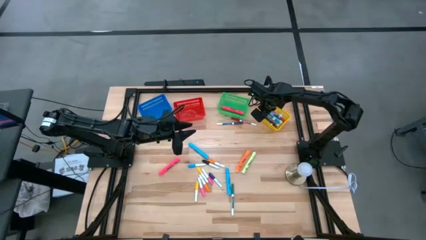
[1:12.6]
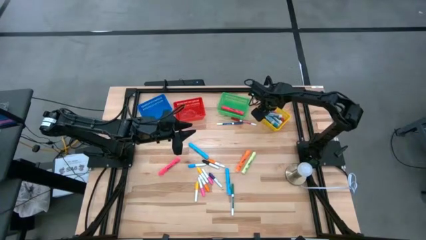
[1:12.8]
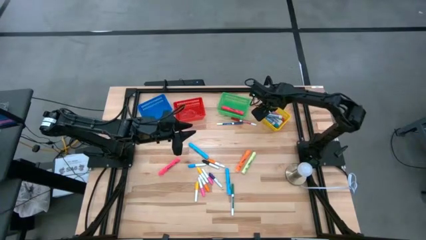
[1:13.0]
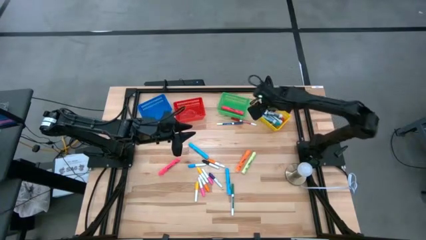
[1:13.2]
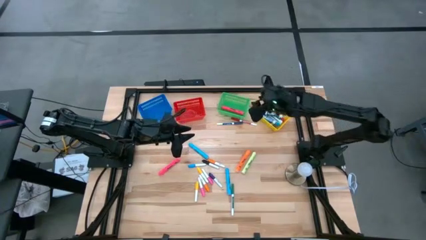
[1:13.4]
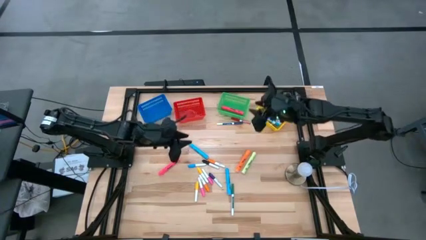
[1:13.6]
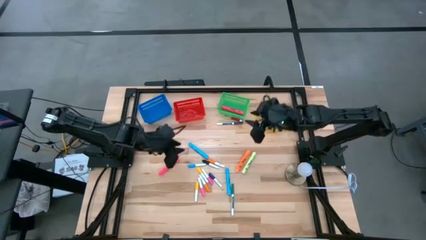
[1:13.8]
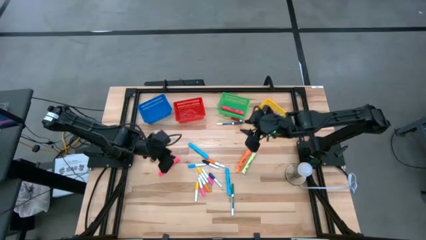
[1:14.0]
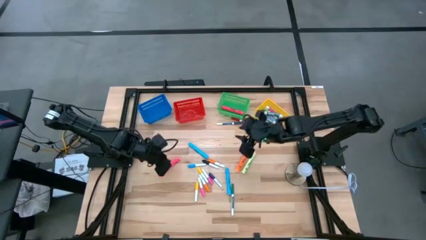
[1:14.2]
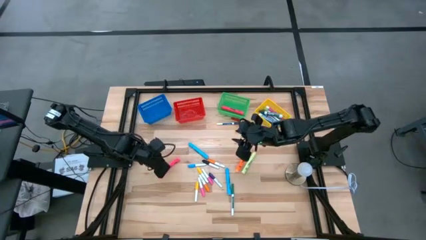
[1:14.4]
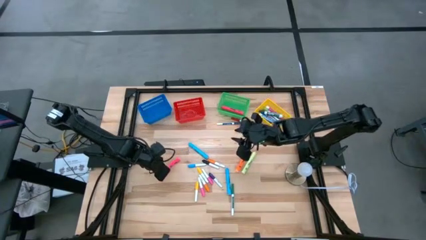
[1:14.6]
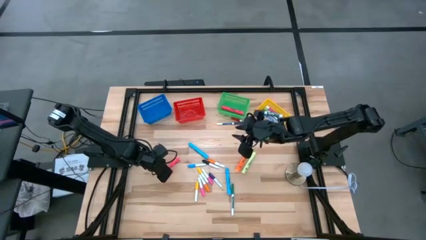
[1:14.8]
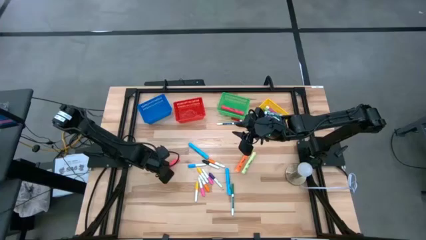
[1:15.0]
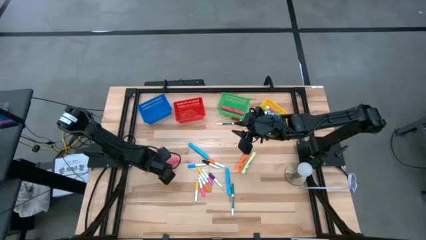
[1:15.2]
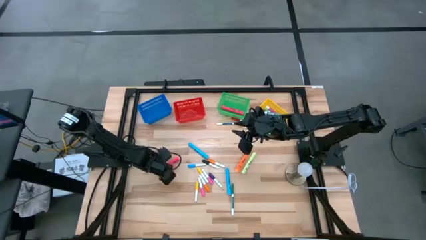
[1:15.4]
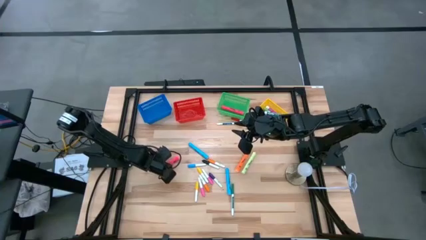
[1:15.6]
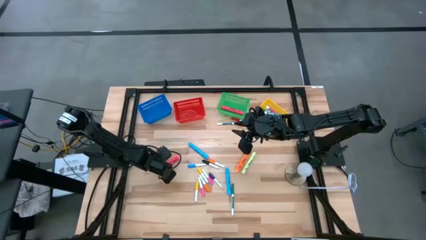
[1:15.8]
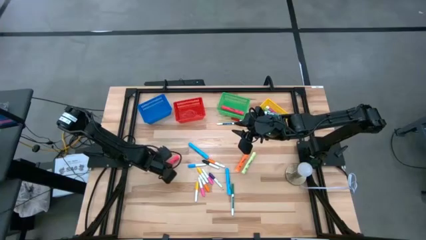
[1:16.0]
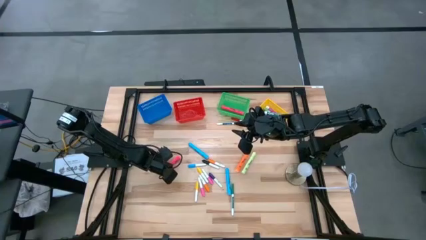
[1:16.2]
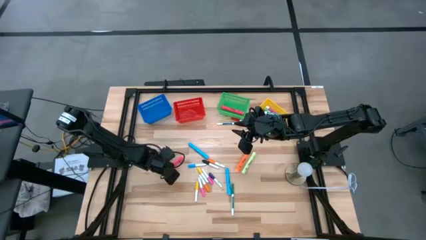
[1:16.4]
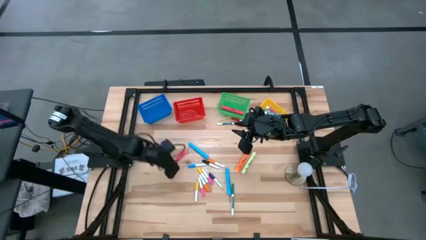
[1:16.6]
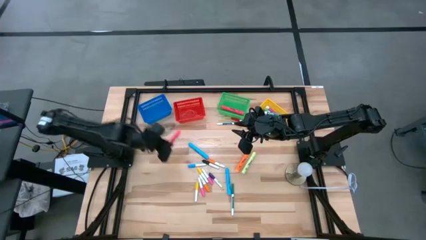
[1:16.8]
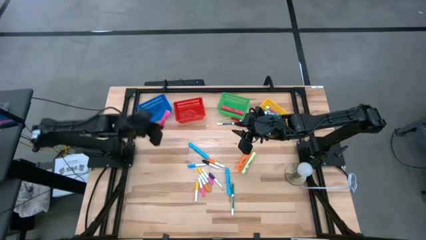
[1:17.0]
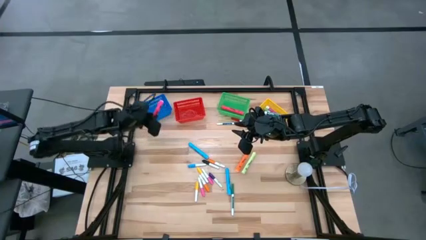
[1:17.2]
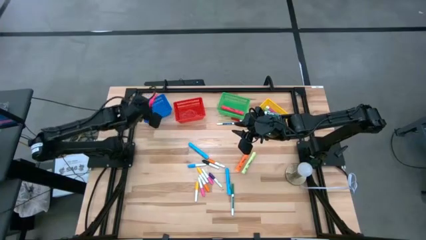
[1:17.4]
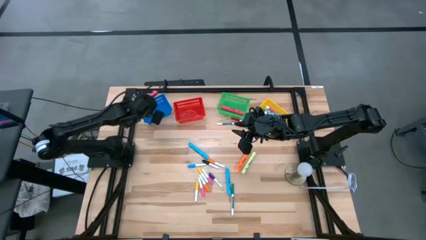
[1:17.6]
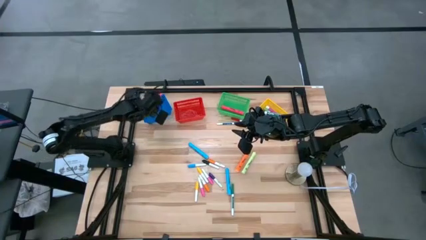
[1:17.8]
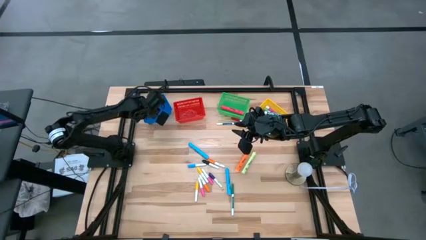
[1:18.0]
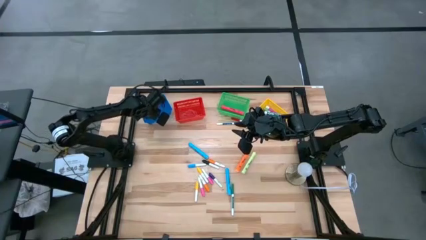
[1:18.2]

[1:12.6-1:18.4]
Task: Pick & Place Markers
Put the large pink highlighter pen into the blue bin

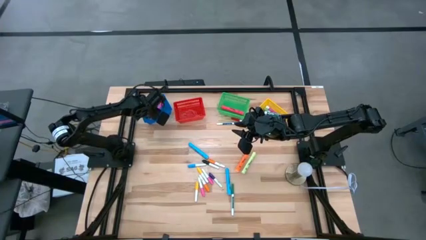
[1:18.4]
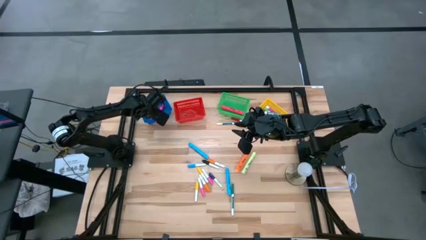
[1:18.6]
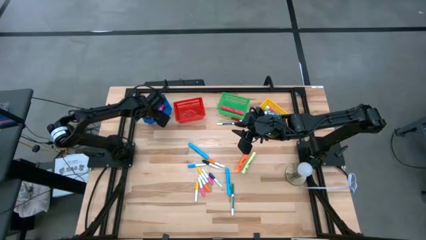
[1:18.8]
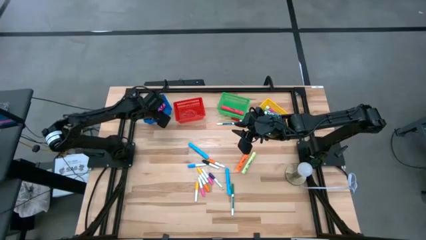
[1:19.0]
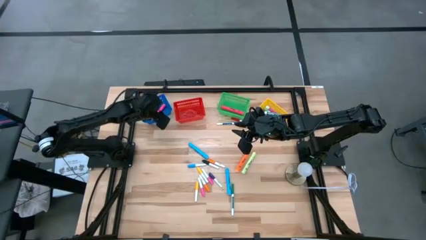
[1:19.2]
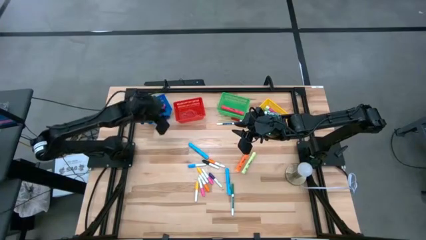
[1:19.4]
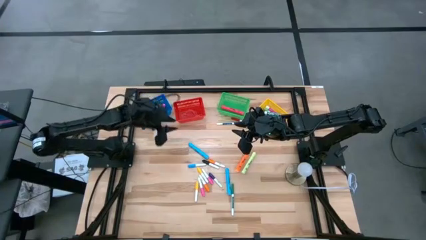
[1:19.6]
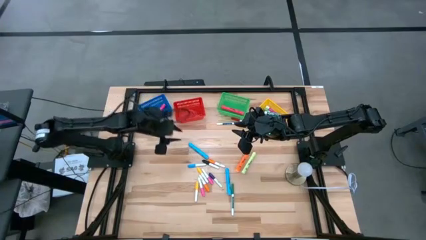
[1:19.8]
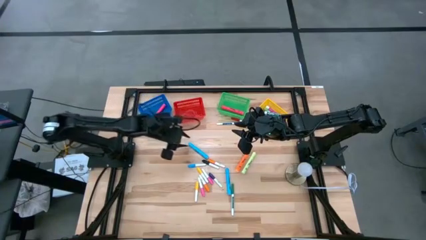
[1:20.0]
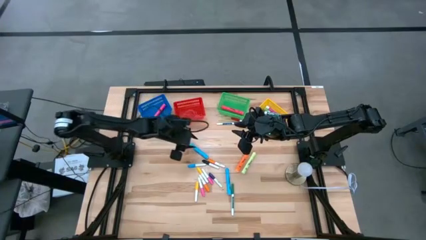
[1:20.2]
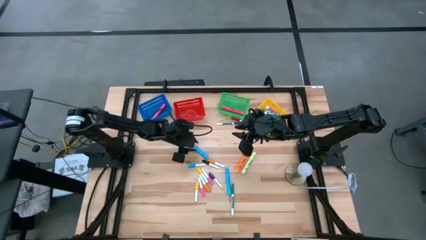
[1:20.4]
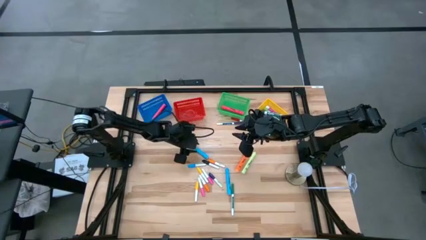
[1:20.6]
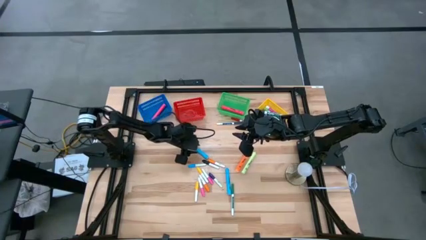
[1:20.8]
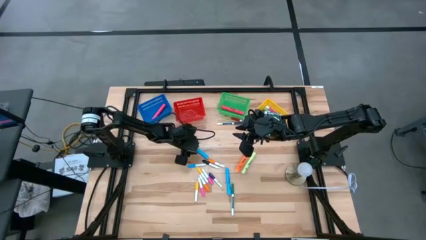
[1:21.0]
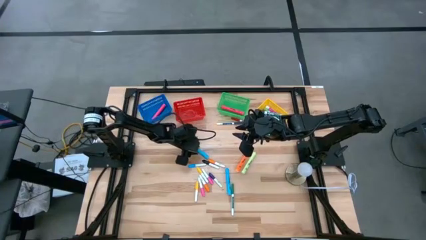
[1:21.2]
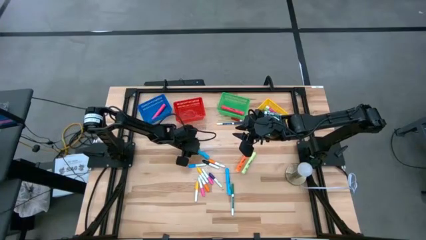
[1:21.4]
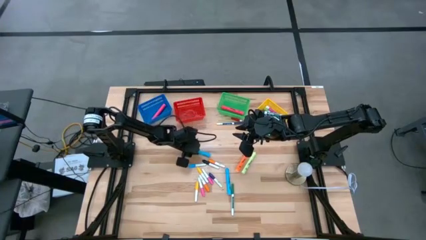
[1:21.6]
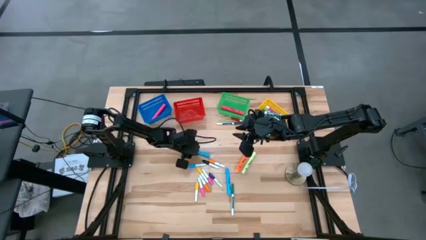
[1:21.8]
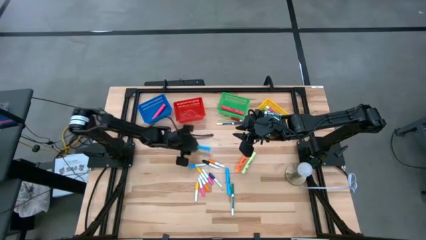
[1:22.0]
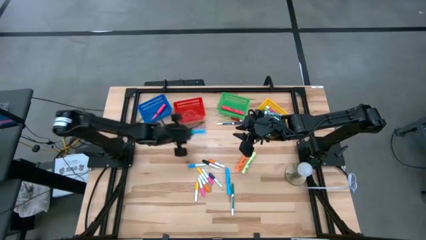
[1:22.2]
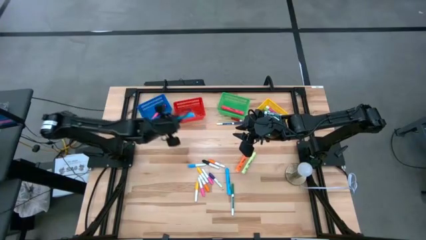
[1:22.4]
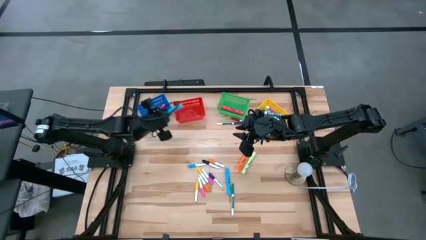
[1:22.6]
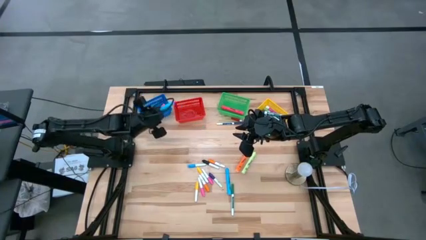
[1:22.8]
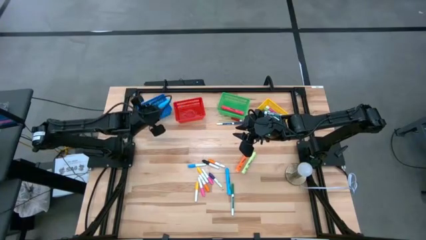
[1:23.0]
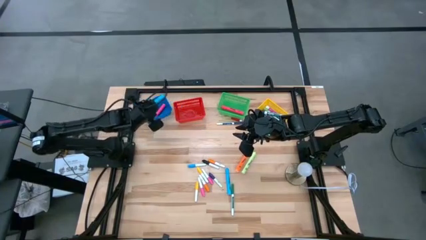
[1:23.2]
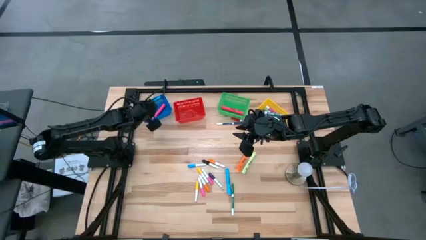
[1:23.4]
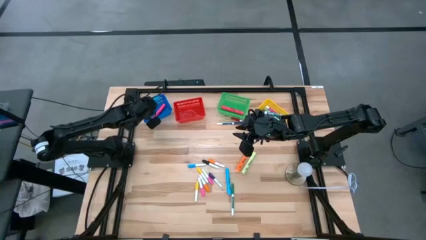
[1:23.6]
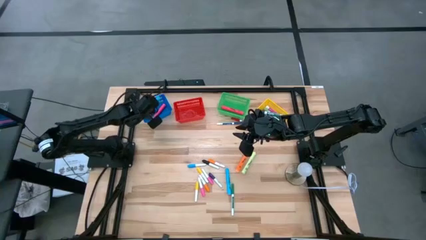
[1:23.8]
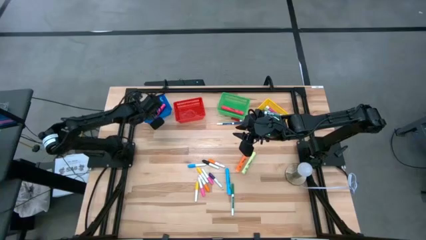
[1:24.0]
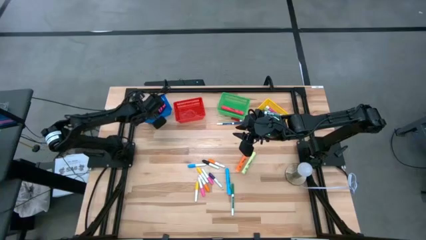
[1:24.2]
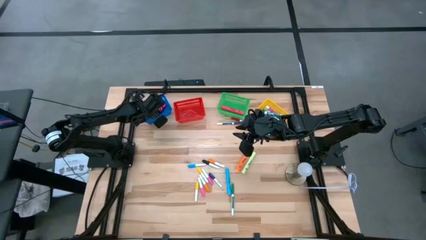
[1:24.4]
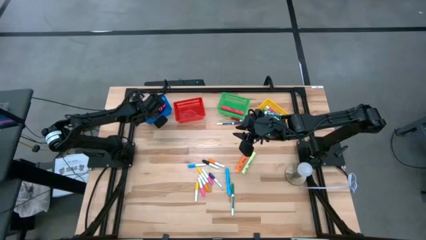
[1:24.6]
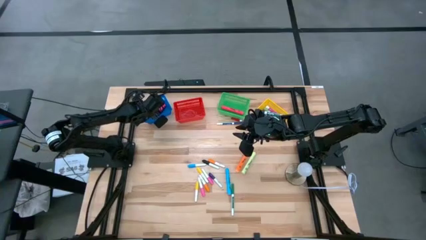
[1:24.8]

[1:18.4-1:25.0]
Put the top large blue highlighter pen into the blue bin

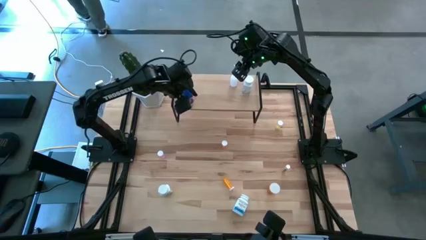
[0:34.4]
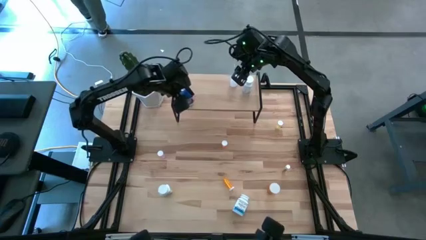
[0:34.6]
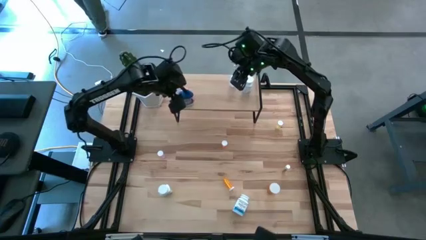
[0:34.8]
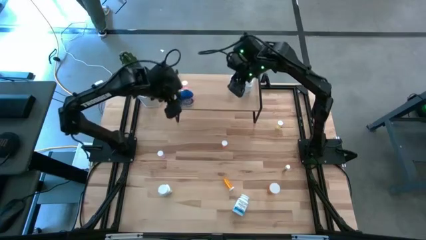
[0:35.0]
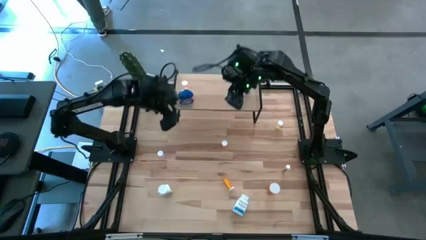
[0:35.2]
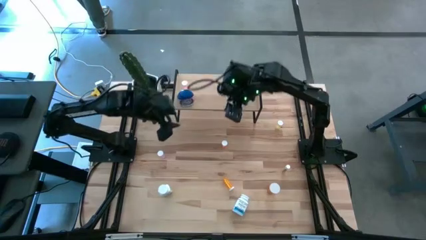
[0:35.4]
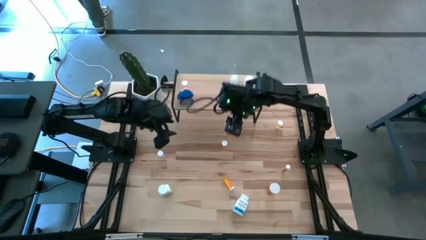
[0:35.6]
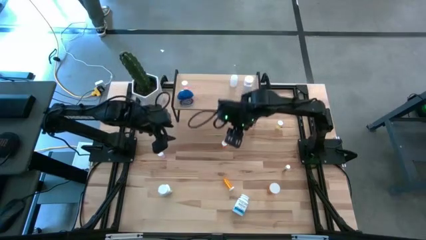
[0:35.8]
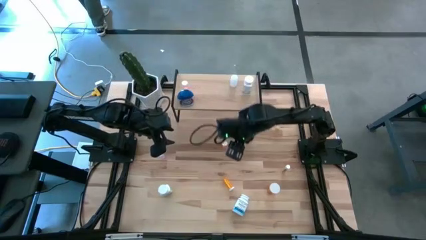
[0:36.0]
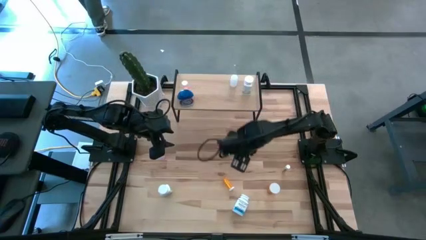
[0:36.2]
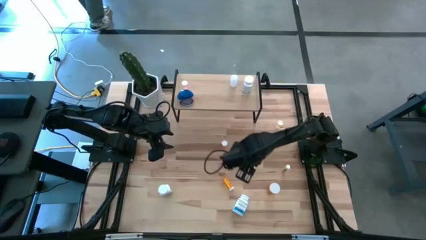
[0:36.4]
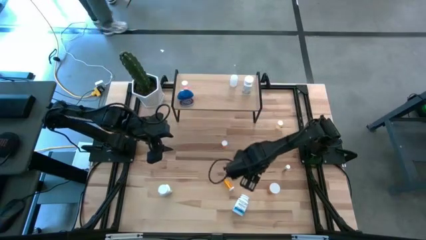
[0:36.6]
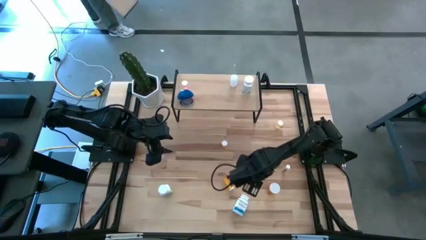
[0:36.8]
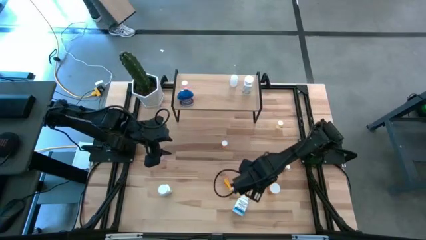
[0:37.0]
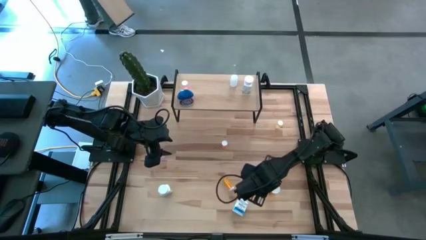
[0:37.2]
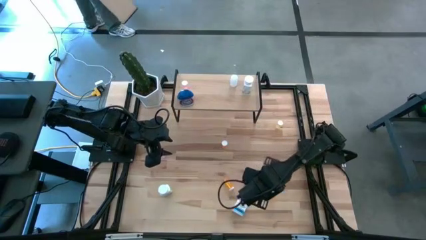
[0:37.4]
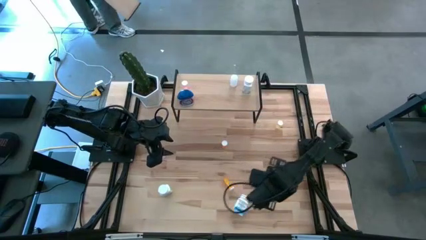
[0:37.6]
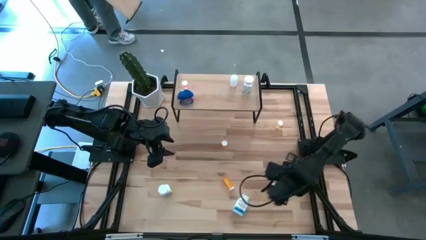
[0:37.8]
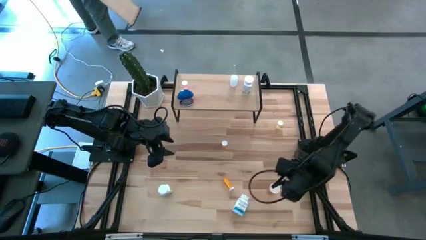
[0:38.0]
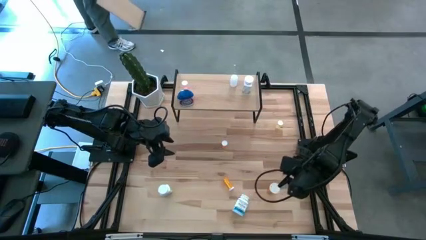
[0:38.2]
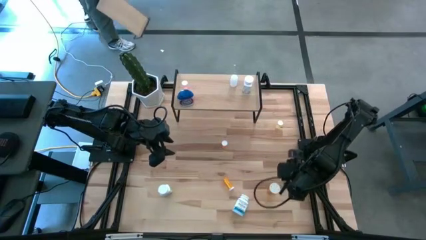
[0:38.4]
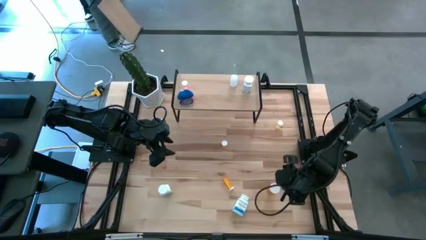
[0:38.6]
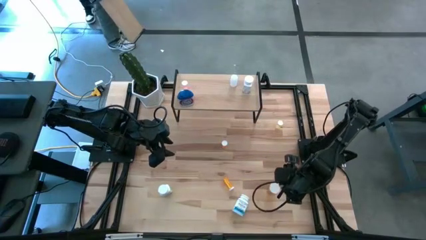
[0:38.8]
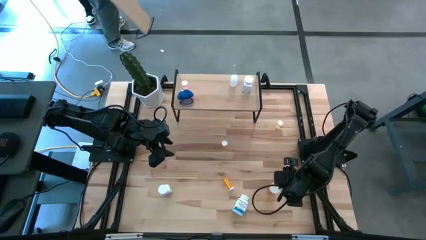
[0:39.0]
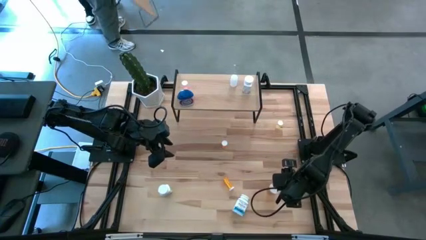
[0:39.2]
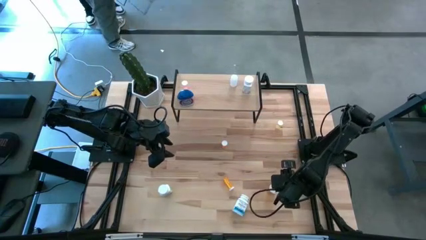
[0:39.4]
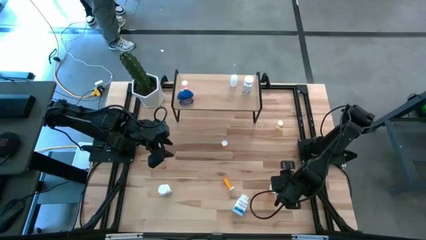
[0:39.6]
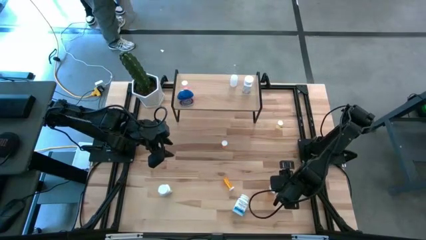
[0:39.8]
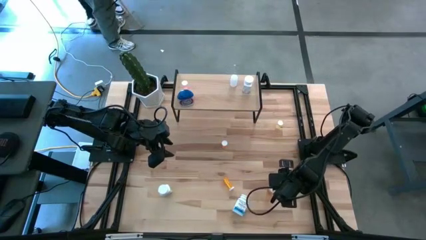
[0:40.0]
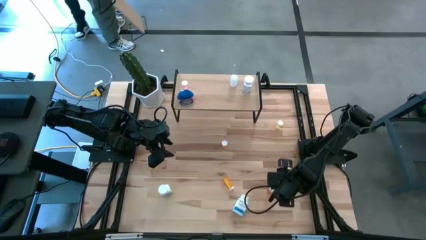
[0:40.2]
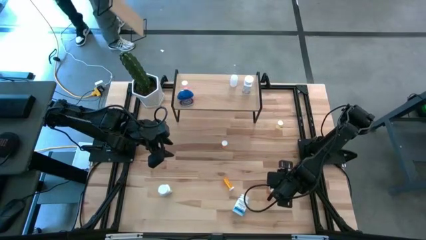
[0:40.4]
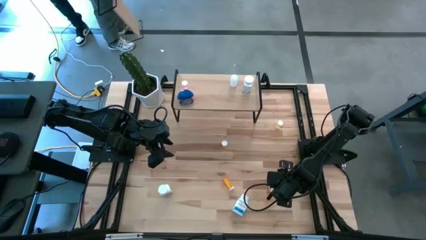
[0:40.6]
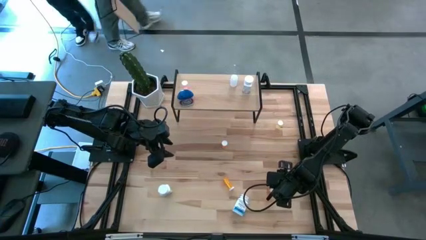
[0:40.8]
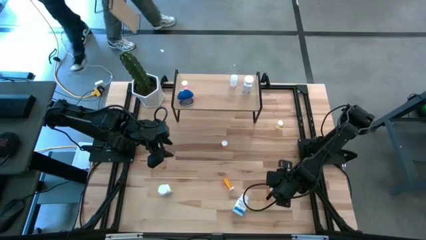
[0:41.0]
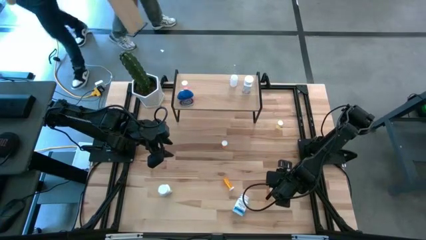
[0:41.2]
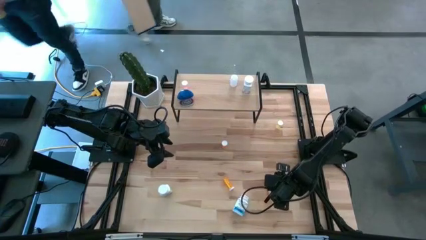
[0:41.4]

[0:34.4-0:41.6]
Task: Pick and place medicine bottles onto shelf by color
Put the orange large pill bottle on the shelf
